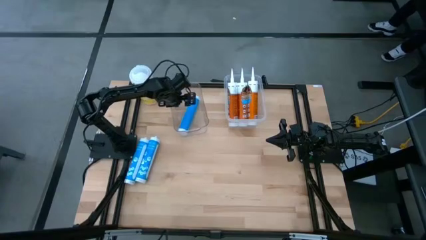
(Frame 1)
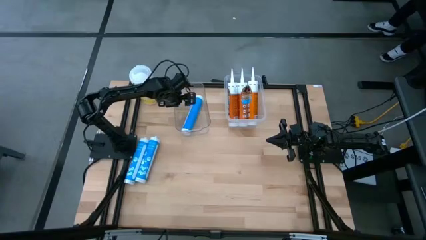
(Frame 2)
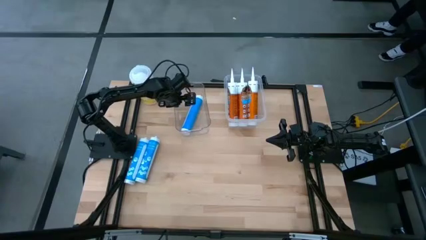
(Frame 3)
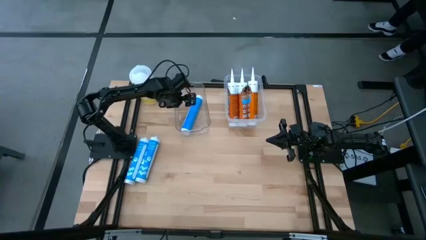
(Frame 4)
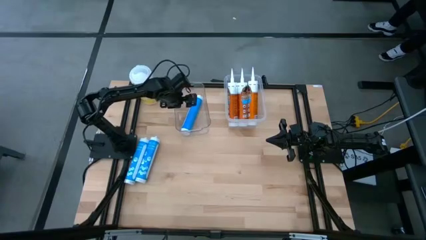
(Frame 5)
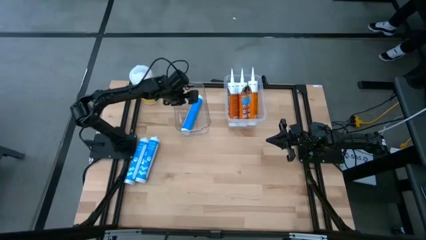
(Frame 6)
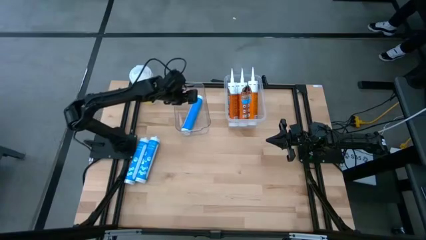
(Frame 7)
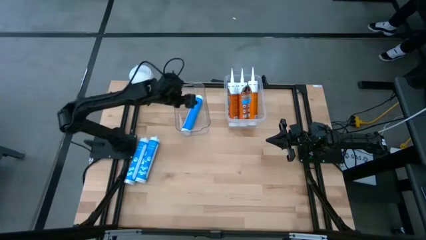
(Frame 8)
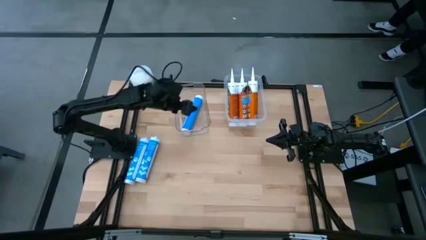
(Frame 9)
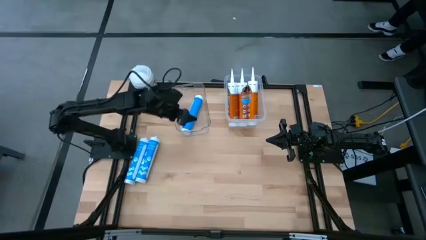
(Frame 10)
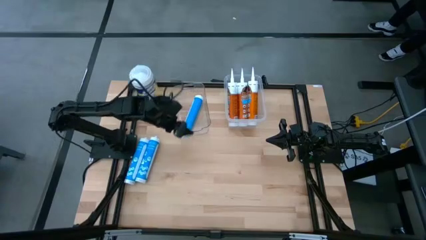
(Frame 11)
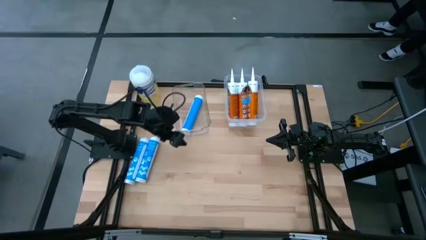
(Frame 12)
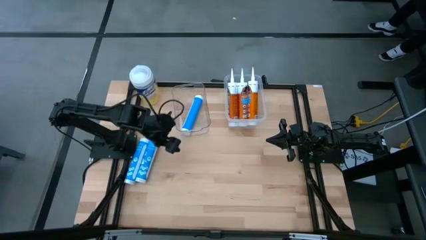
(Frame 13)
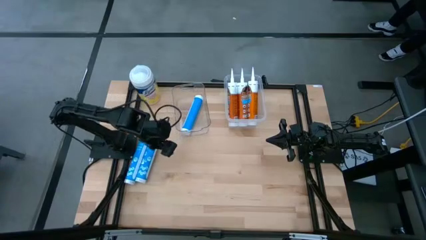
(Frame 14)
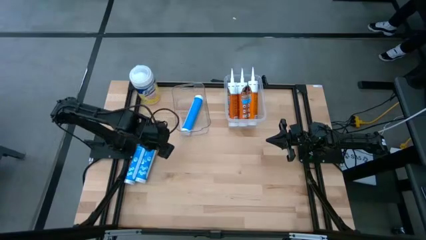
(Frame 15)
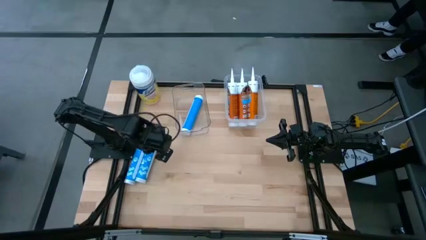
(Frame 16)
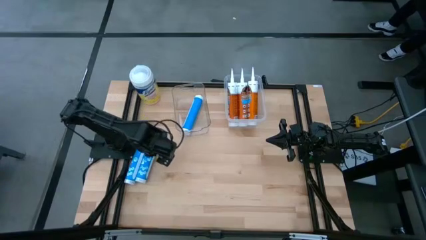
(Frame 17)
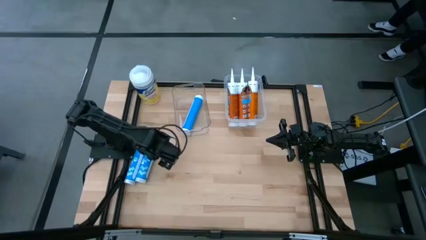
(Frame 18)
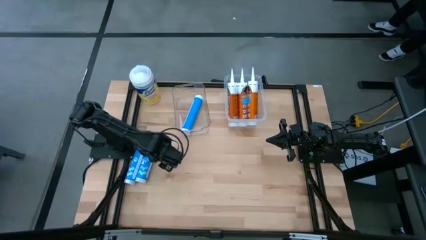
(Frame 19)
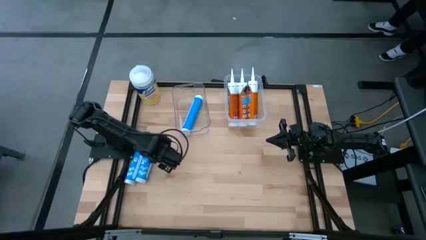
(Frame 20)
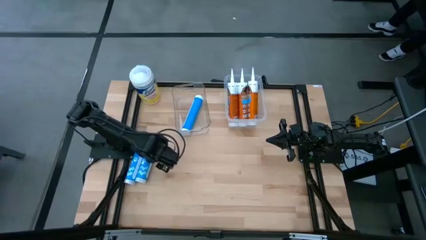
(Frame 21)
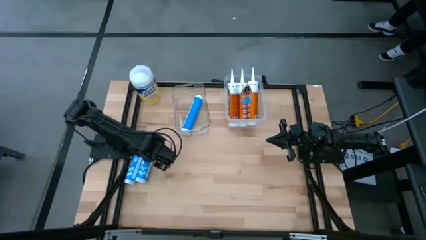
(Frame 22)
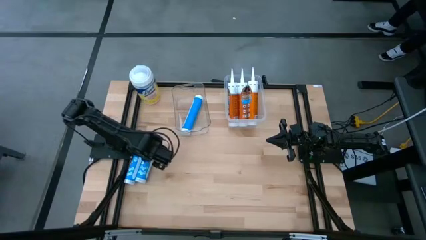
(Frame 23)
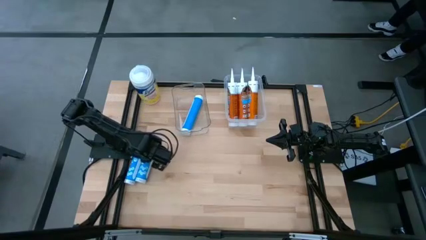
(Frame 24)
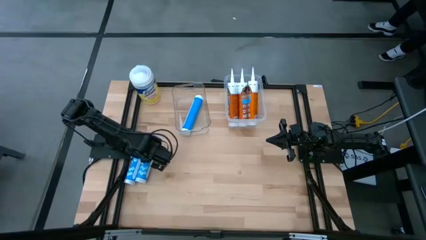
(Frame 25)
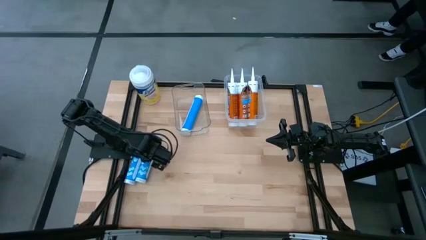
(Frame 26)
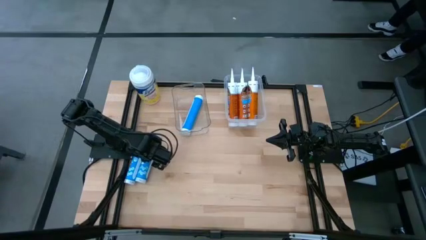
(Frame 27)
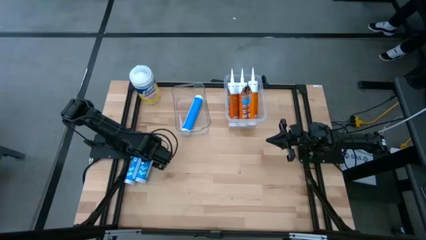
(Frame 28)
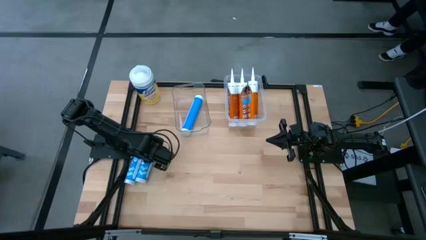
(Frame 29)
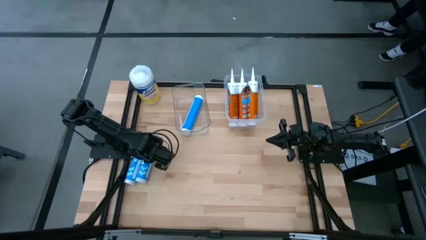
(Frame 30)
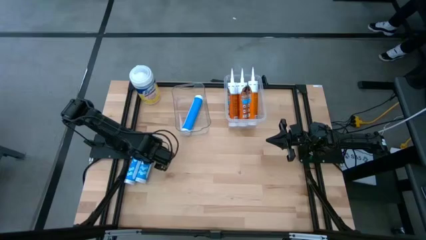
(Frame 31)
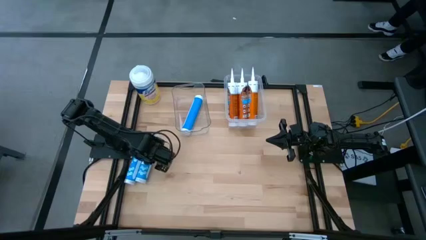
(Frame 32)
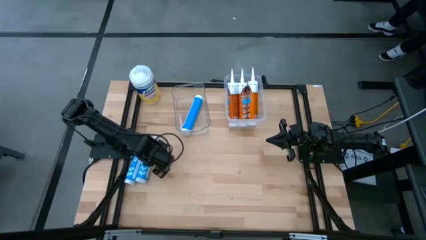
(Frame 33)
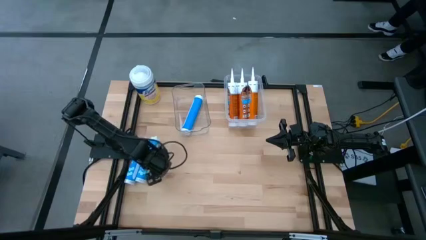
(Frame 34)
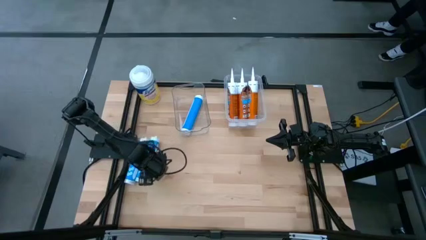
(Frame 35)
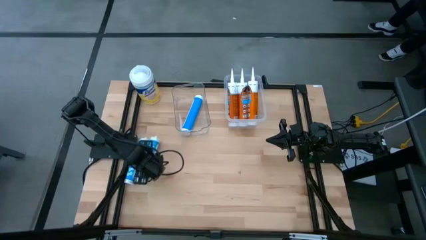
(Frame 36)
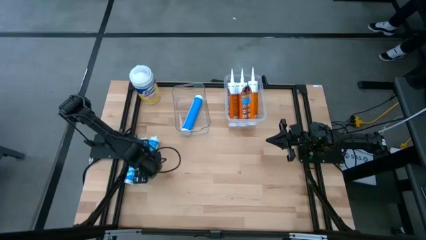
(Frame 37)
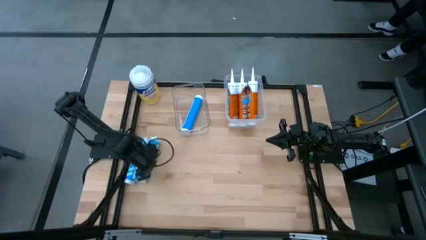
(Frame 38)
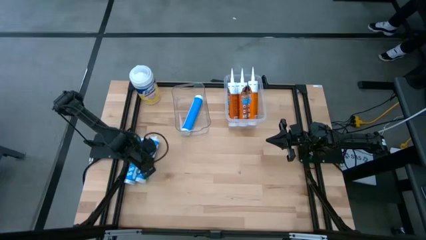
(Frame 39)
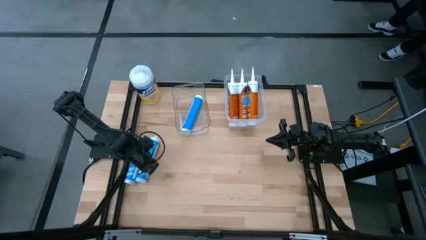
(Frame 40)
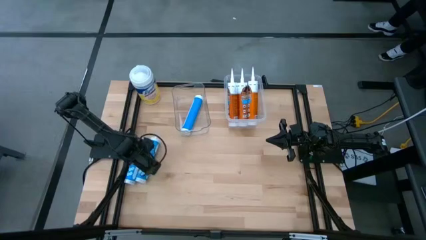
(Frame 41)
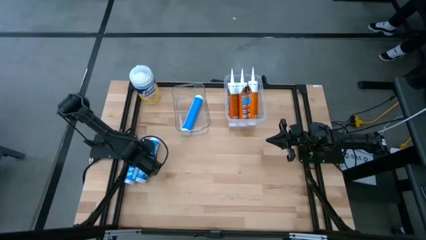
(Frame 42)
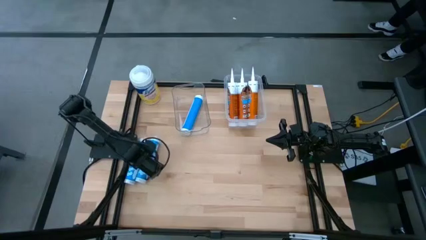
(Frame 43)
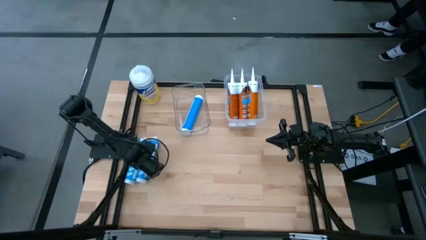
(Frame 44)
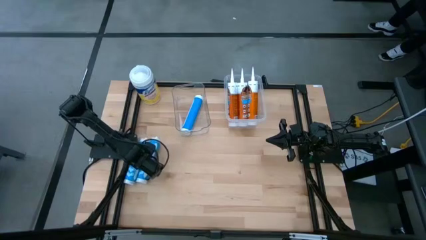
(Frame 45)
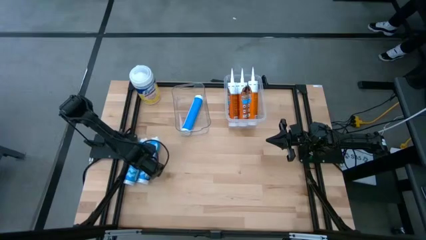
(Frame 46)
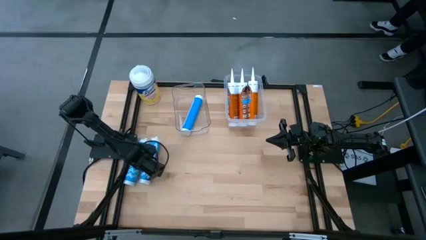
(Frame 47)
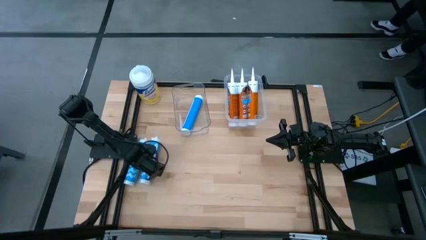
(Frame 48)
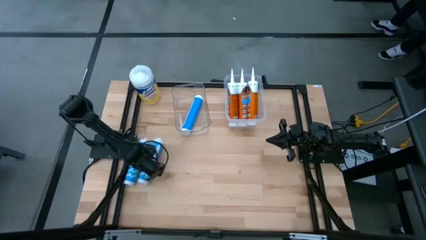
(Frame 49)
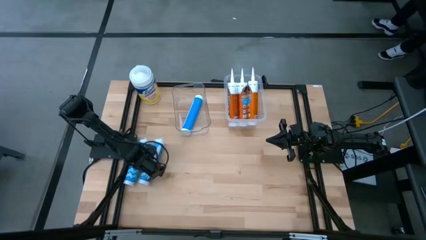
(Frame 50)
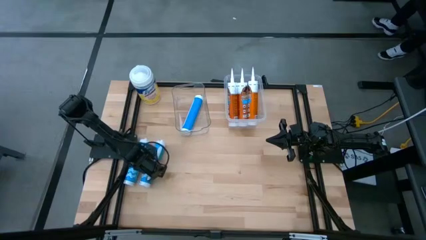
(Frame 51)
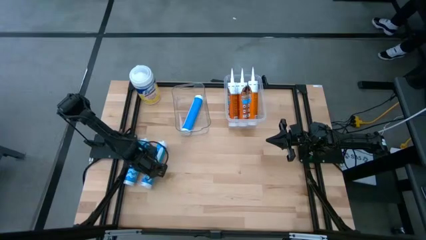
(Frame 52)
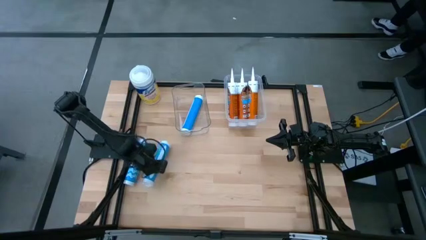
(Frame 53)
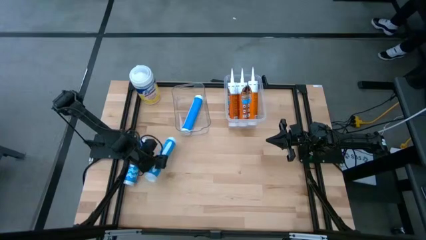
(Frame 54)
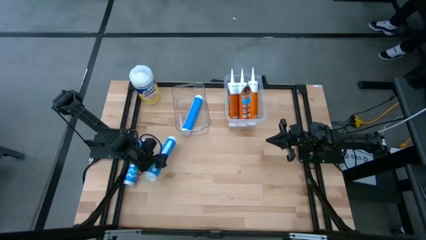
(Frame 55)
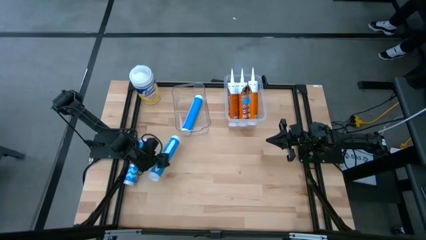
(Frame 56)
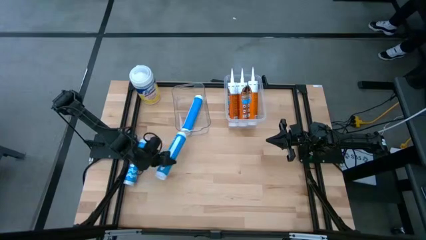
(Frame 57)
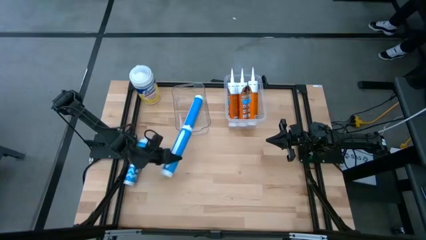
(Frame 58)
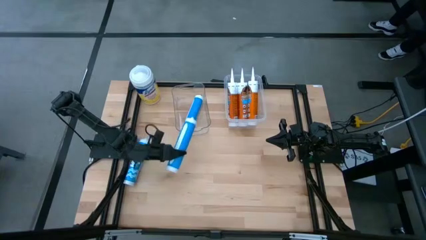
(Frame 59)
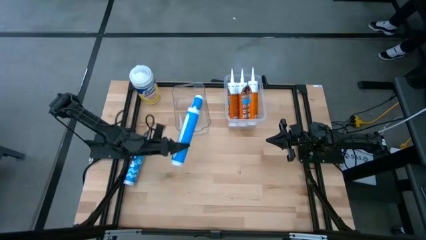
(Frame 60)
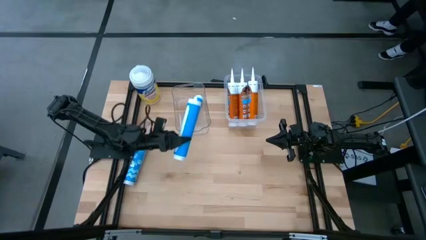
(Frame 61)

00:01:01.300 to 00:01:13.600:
Task: Pick & place silicon tubes, Sealant and Lysol wipes
Put the right blue sealant into the left transparent bin
